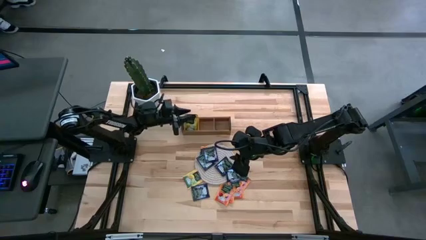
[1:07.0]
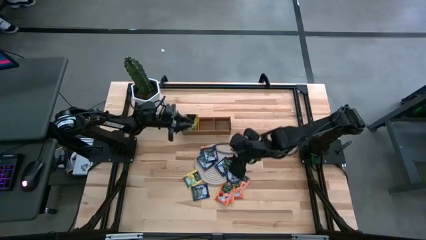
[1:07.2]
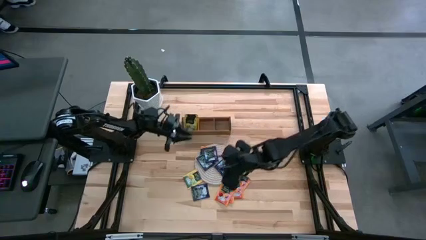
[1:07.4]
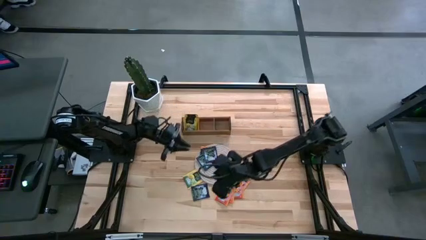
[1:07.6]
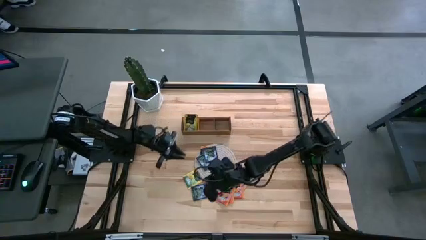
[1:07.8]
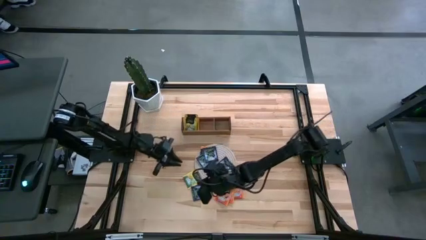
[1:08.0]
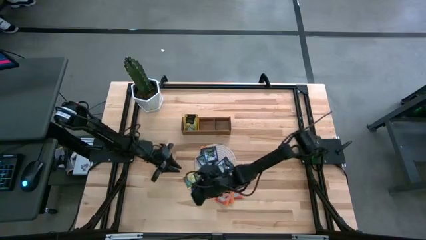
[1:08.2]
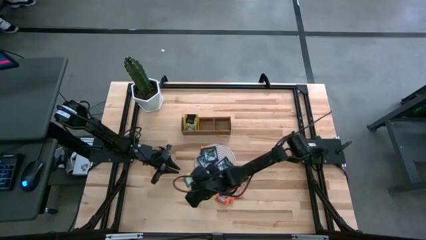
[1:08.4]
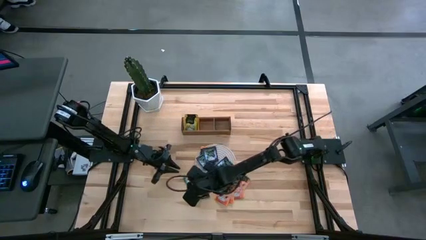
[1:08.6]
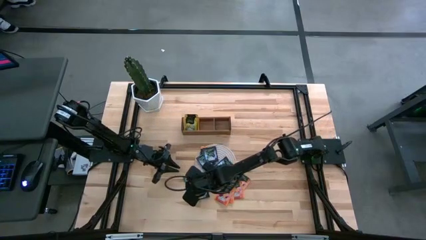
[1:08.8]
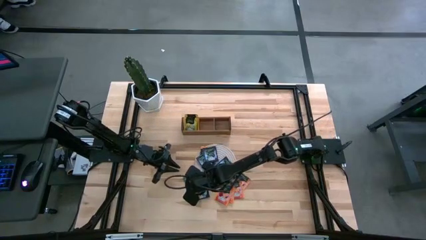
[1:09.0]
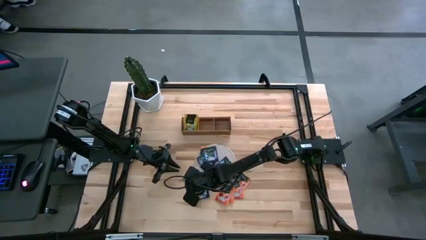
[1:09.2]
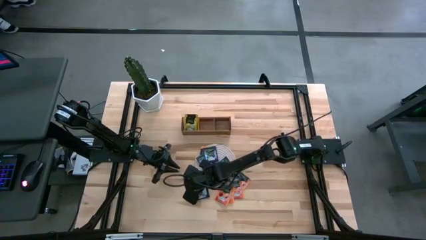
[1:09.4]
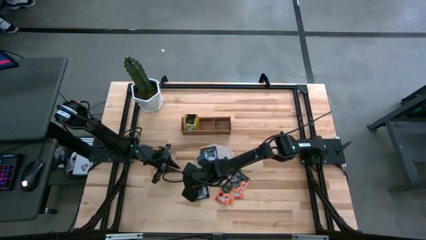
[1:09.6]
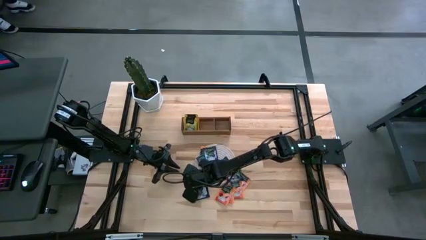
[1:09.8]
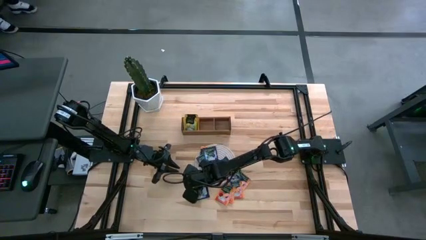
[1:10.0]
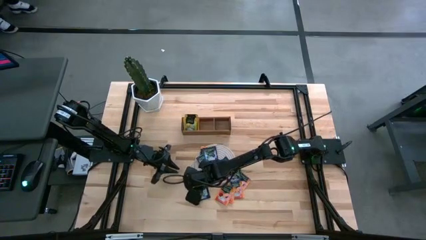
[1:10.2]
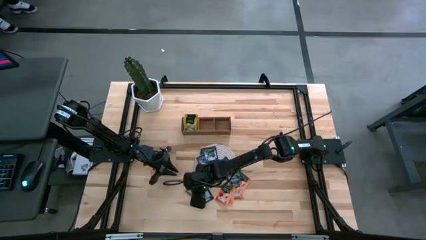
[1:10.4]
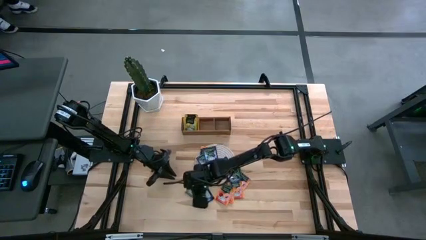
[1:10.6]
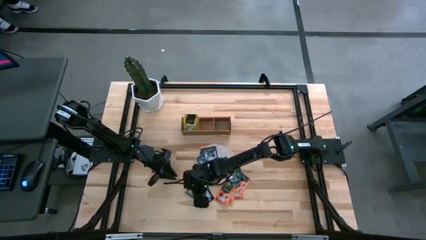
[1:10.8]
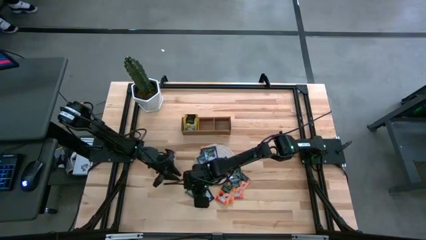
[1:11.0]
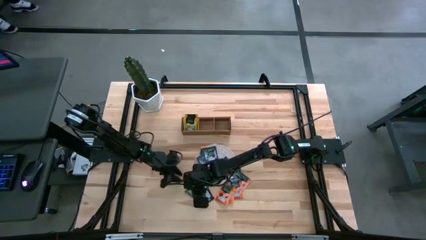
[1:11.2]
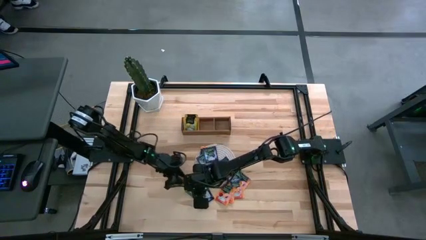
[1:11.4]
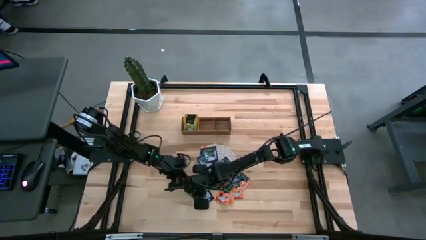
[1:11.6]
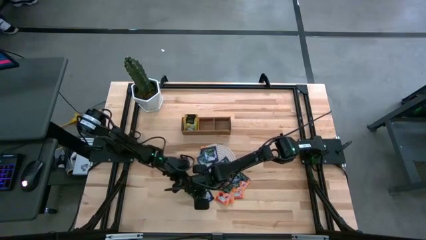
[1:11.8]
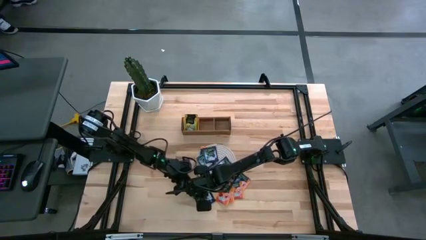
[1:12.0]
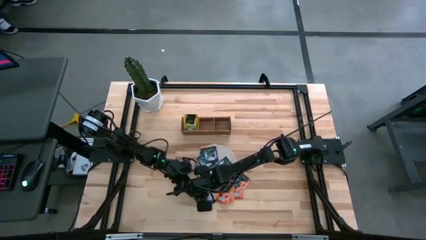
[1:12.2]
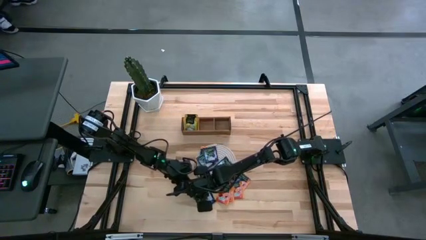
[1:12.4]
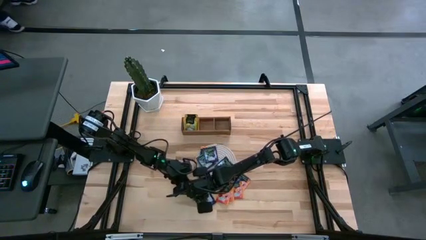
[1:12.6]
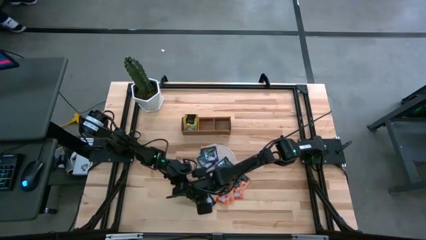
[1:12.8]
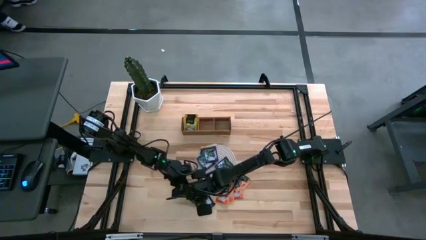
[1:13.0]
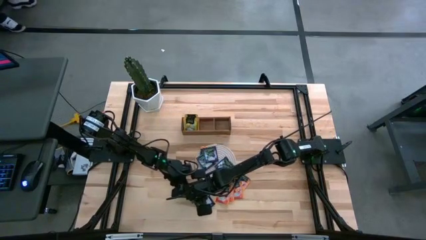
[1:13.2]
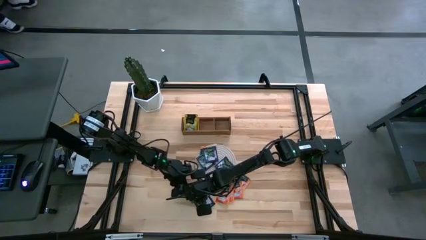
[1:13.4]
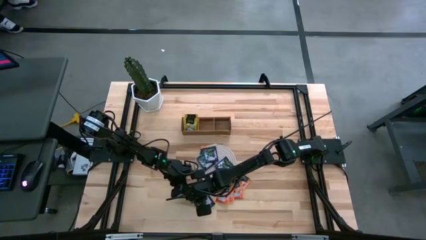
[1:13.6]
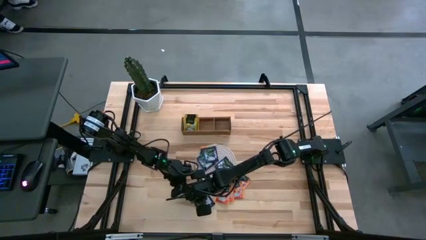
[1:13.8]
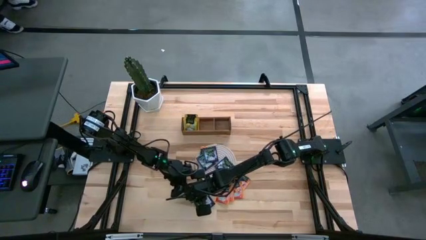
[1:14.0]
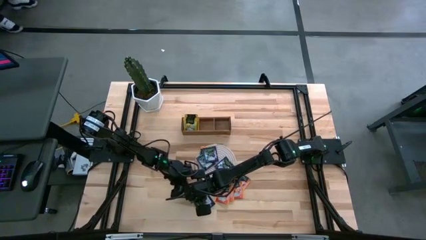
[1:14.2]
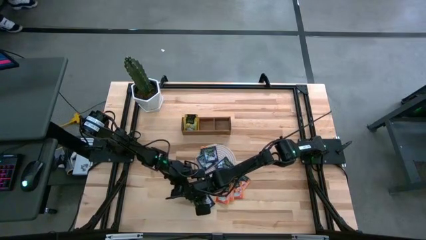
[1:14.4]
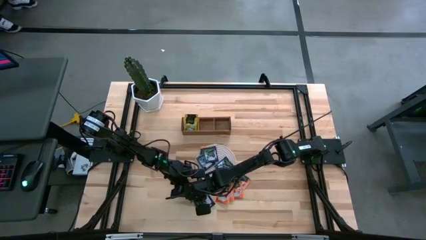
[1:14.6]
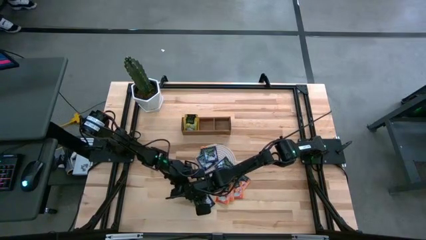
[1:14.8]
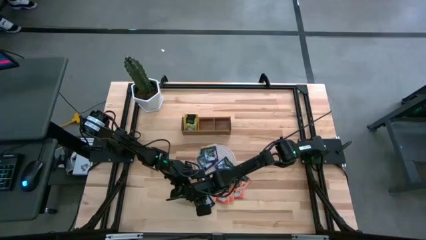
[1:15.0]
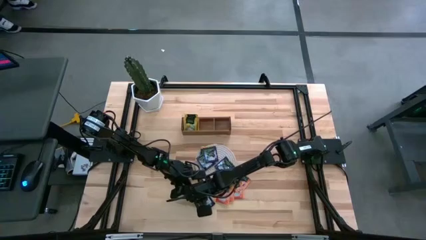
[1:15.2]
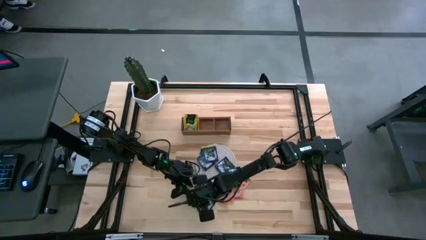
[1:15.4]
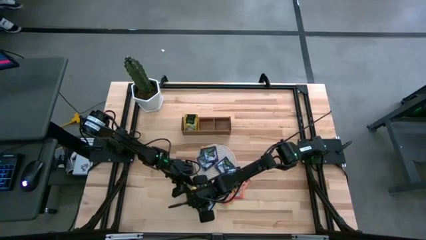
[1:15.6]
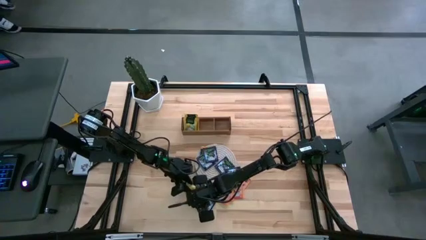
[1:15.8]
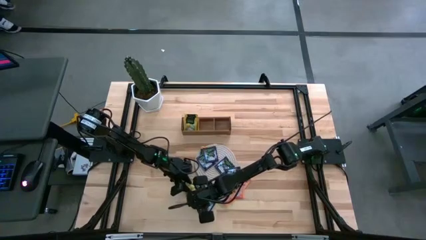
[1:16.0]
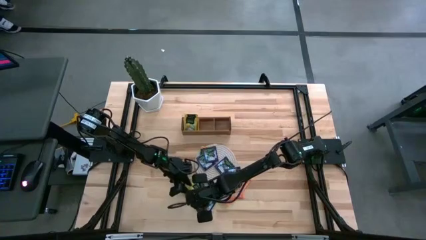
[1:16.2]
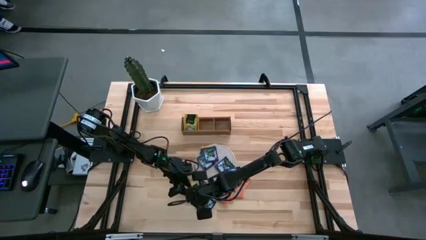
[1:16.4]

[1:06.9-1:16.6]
Task: Pick & Place Tea
Put the yellow tea bag into the left section of the wooden organizer

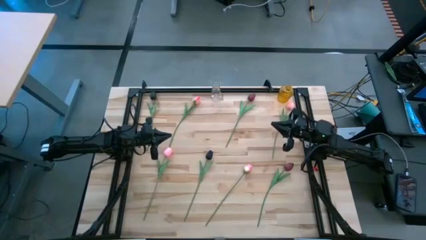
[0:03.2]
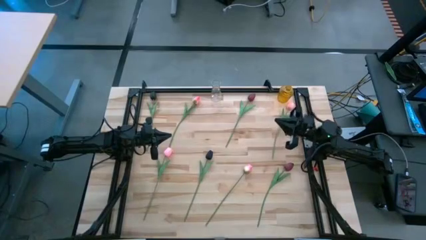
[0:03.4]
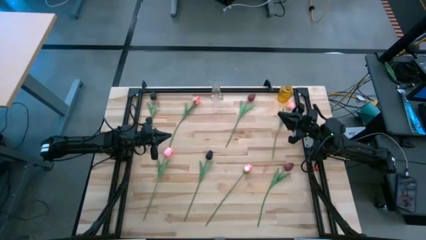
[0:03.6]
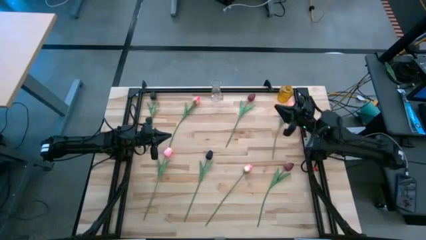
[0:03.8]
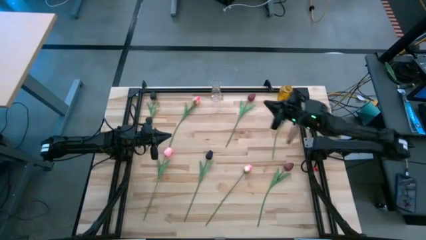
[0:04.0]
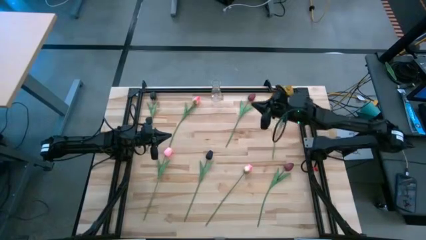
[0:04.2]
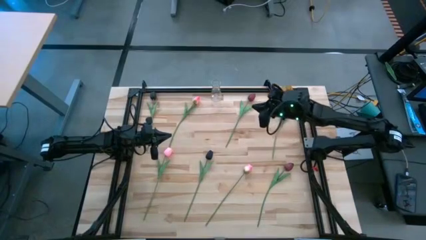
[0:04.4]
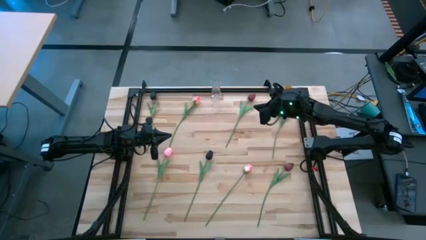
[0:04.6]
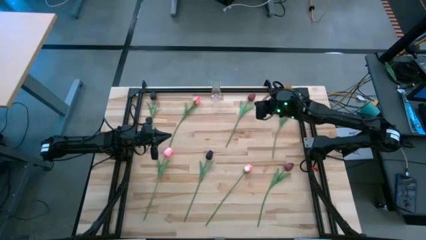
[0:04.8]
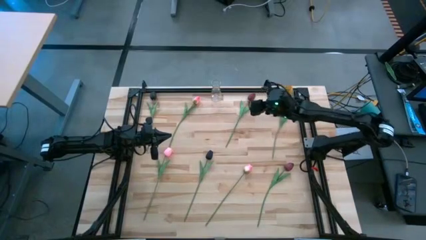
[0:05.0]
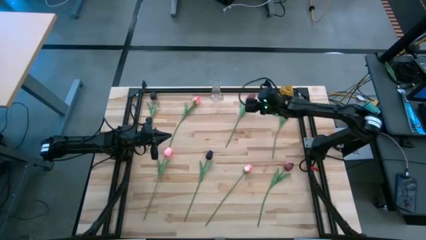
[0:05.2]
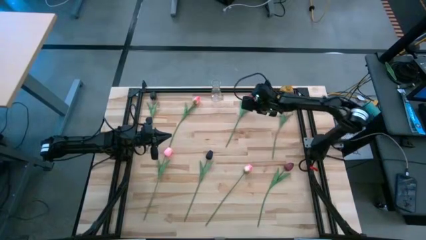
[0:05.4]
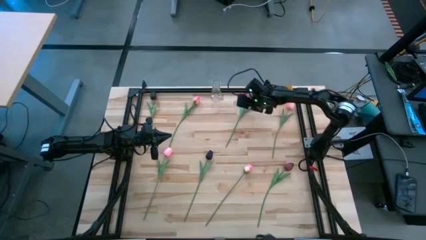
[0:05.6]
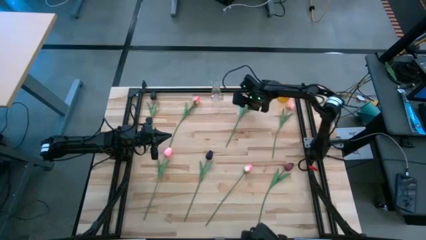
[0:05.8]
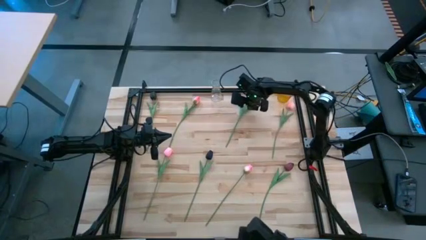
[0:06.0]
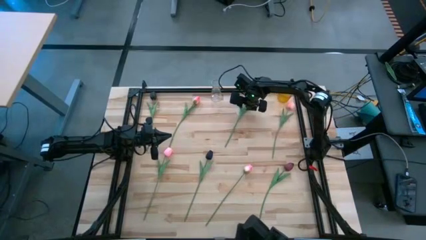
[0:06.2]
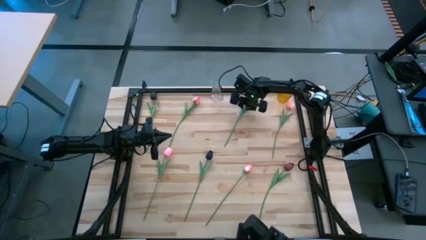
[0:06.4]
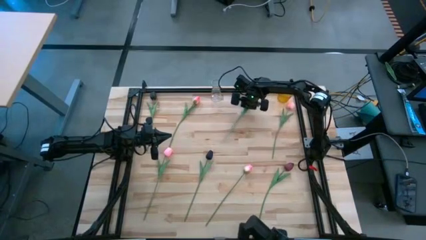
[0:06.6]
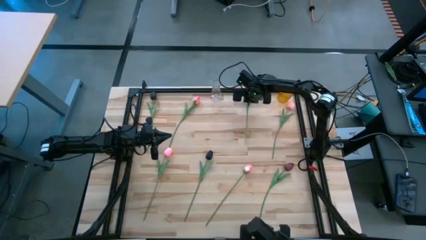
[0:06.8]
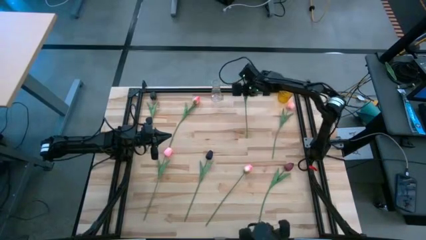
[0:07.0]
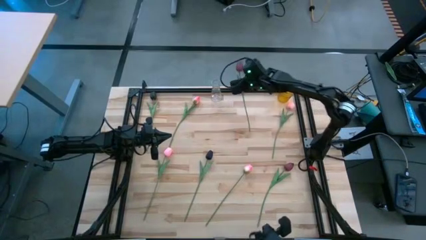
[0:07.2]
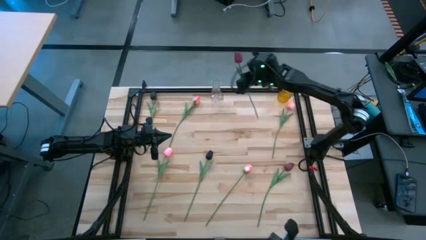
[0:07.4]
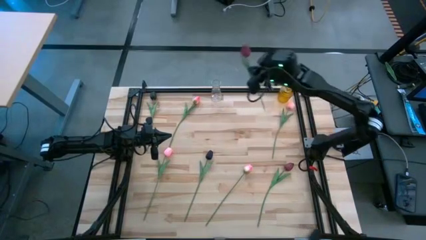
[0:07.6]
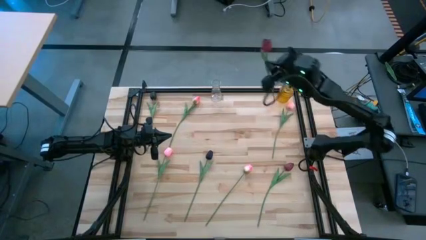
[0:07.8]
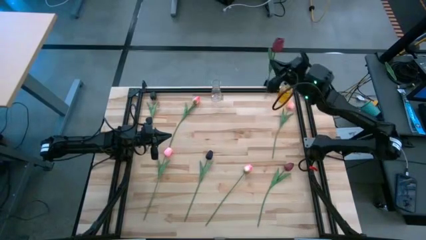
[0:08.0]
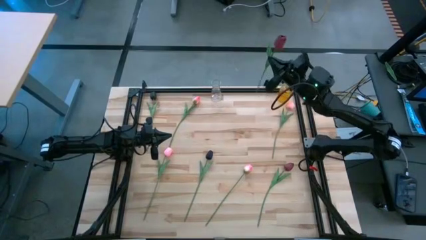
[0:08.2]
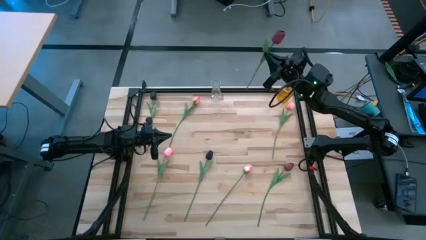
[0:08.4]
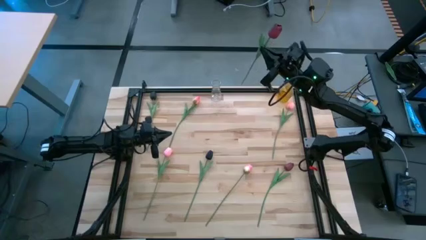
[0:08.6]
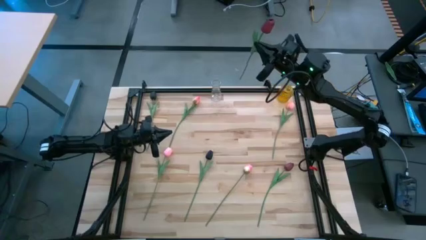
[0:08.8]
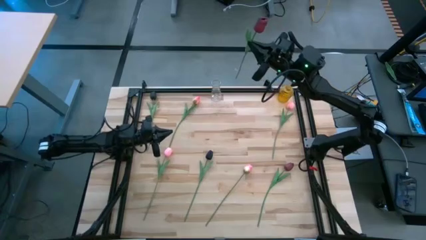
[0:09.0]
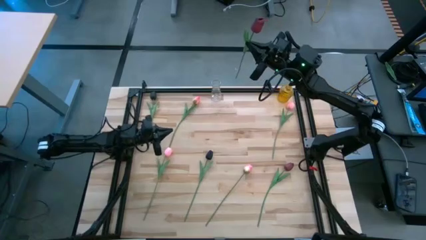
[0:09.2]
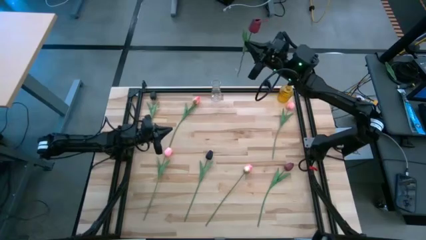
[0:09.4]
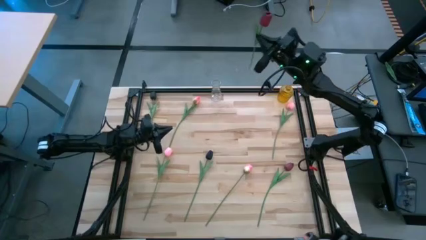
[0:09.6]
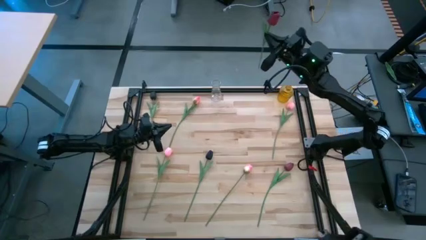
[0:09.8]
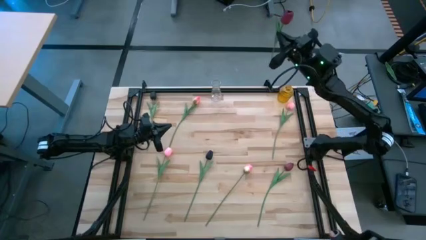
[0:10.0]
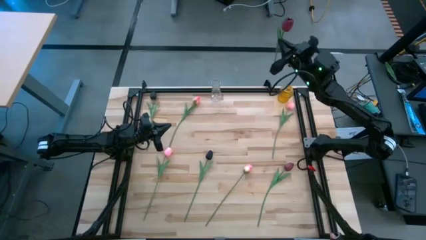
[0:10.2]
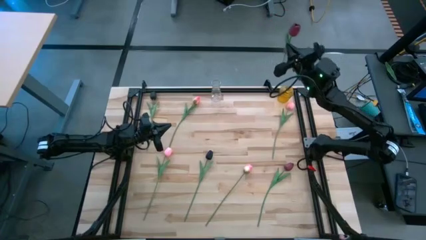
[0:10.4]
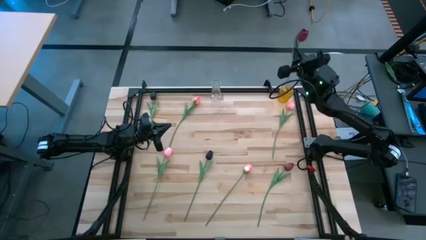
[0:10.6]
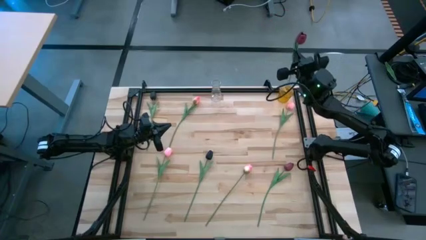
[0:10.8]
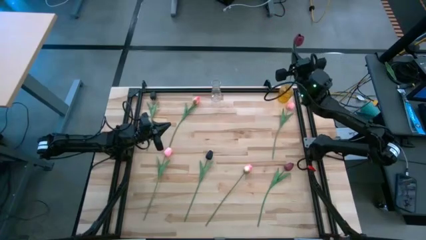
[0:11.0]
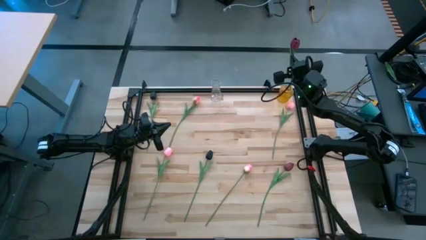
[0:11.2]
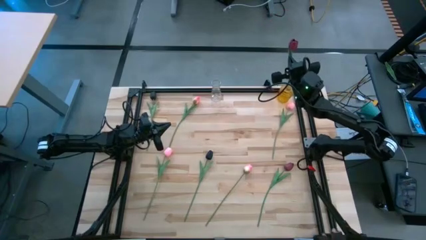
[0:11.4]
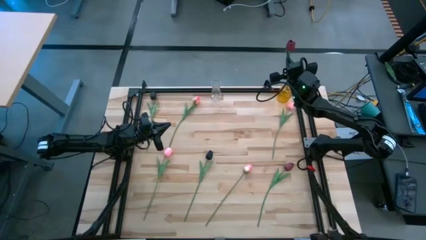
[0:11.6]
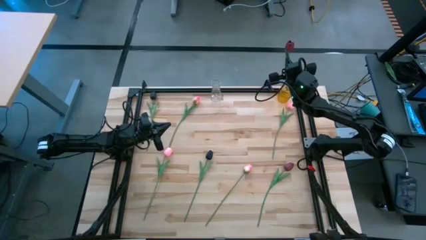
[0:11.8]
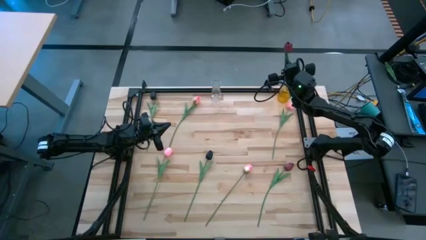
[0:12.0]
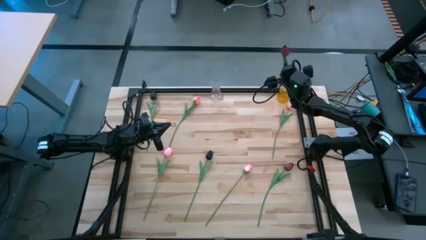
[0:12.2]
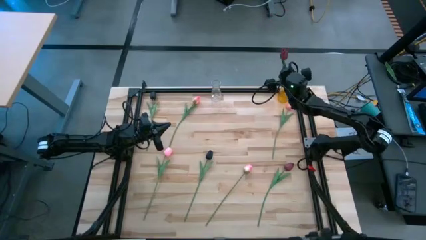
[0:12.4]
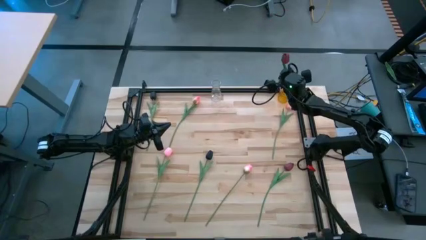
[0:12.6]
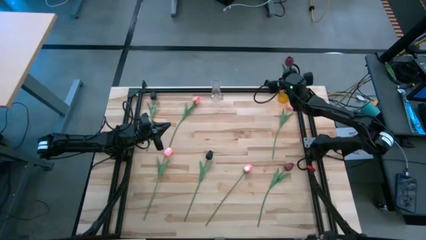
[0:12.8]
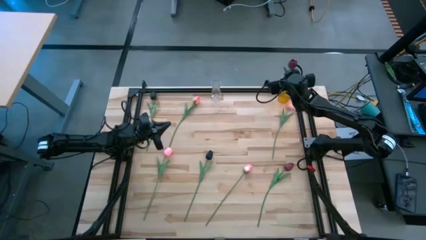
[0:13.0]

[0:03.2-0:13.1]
Task: Sort flowers into vase by color
Put the top red tulip into the crystal vase
